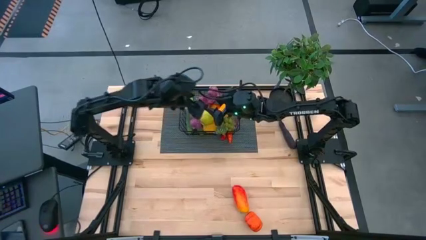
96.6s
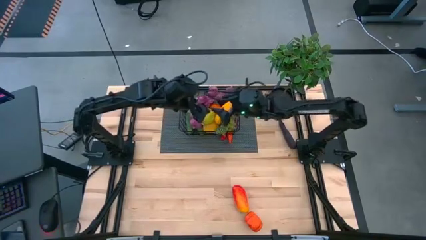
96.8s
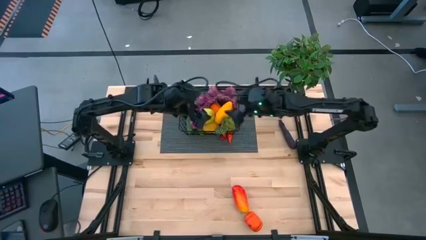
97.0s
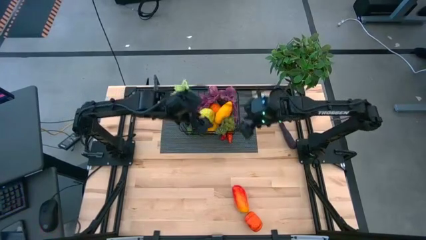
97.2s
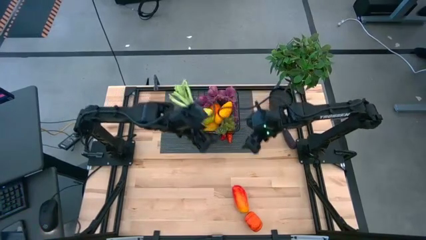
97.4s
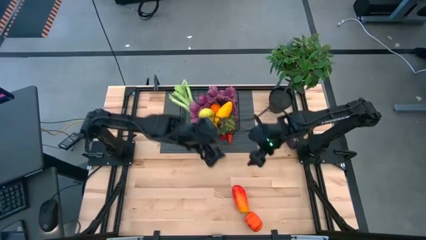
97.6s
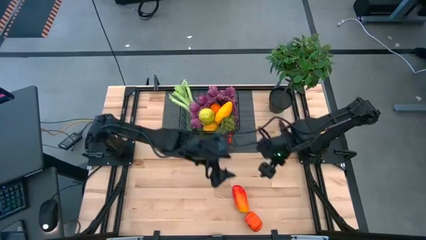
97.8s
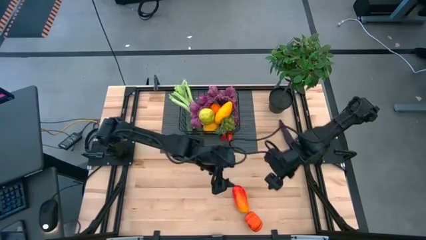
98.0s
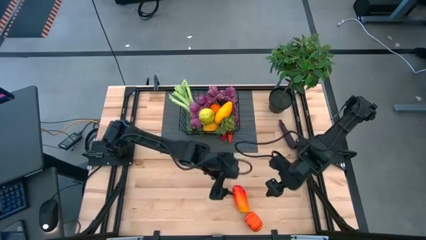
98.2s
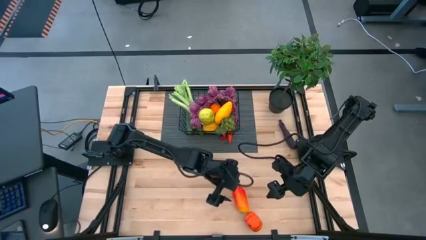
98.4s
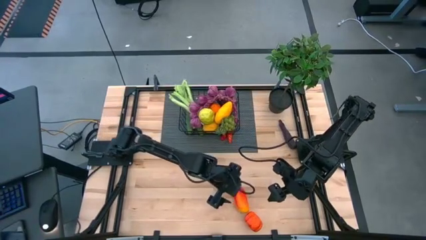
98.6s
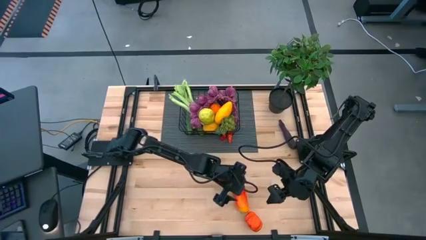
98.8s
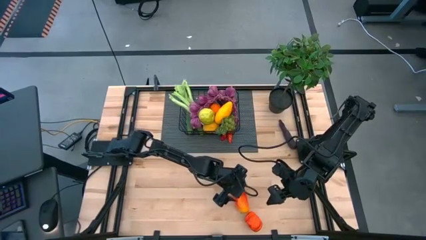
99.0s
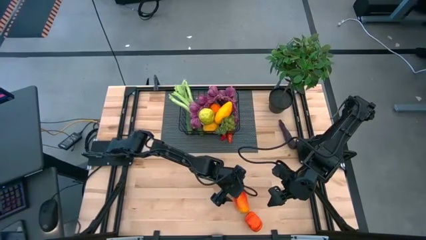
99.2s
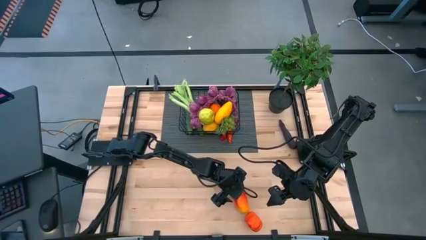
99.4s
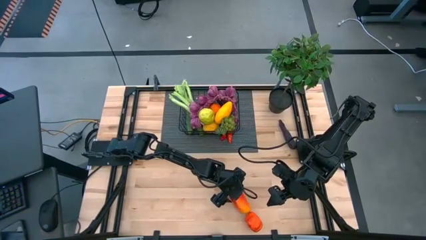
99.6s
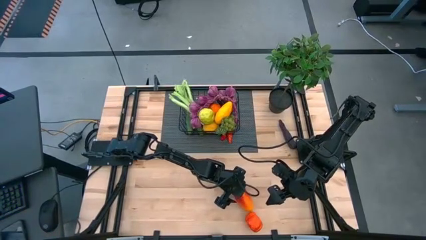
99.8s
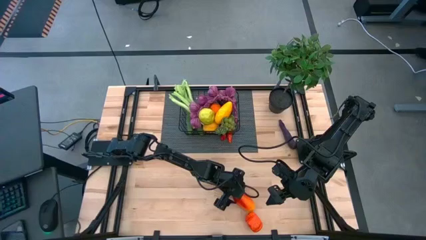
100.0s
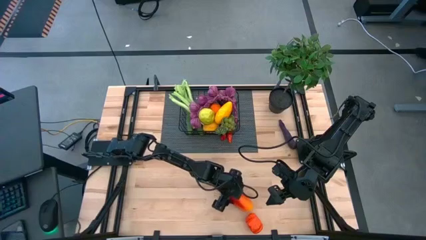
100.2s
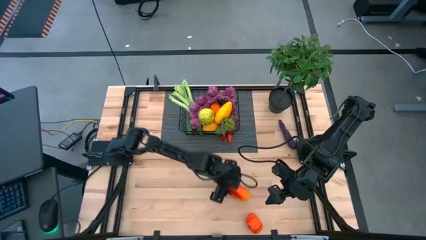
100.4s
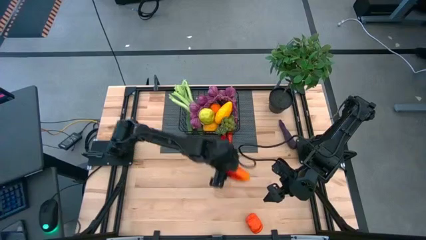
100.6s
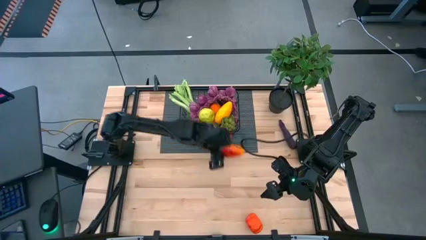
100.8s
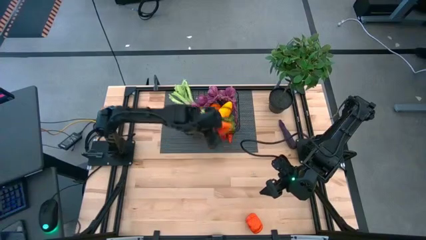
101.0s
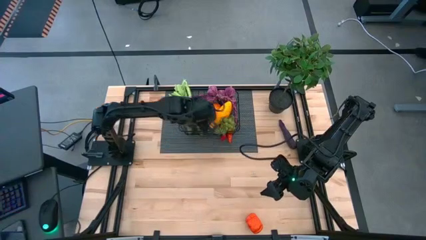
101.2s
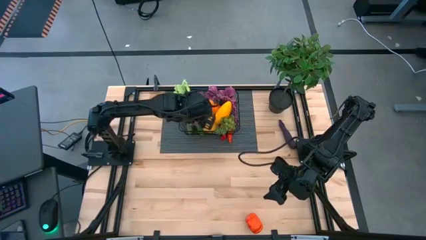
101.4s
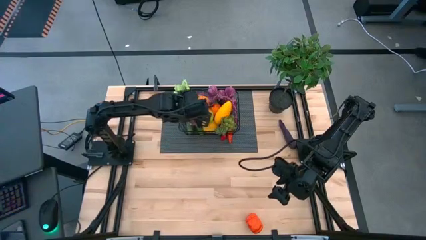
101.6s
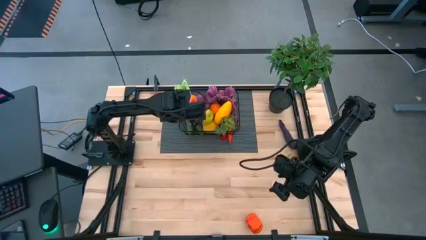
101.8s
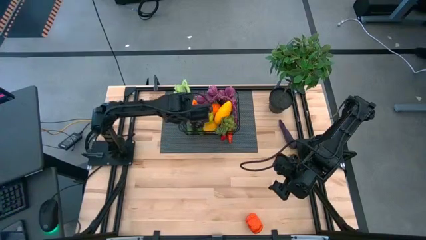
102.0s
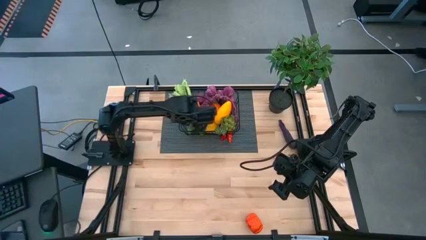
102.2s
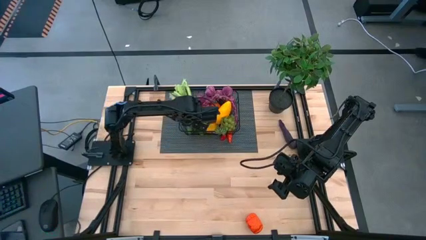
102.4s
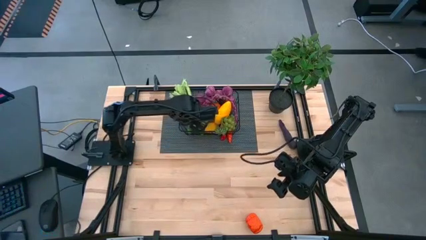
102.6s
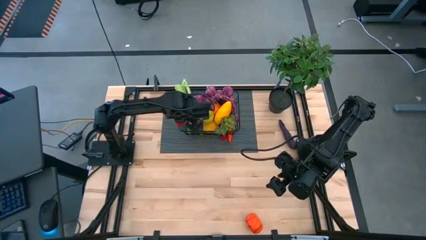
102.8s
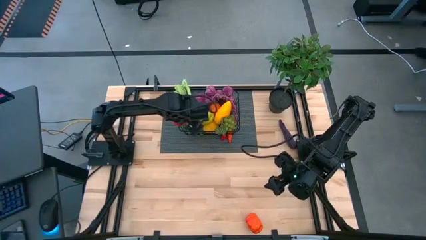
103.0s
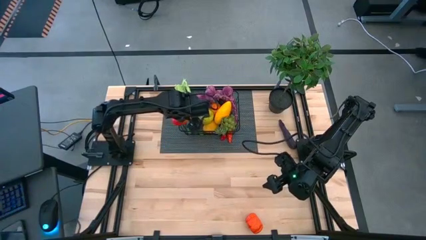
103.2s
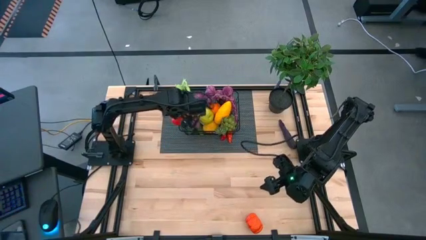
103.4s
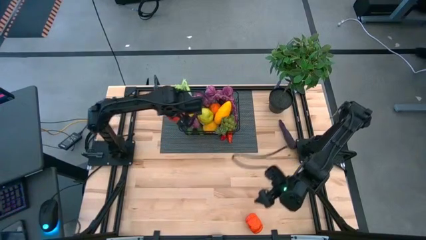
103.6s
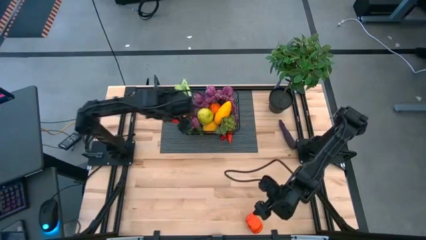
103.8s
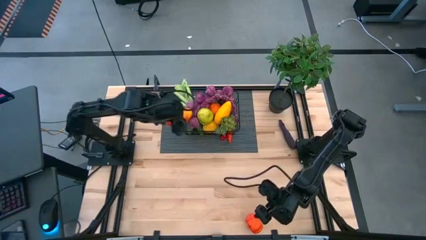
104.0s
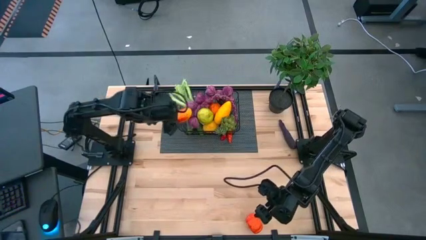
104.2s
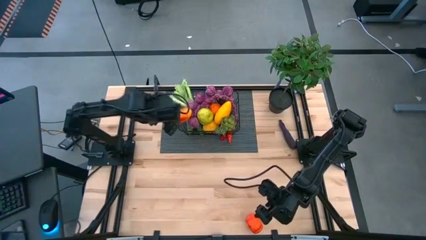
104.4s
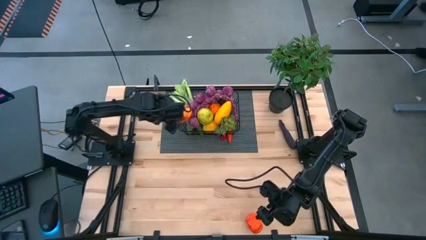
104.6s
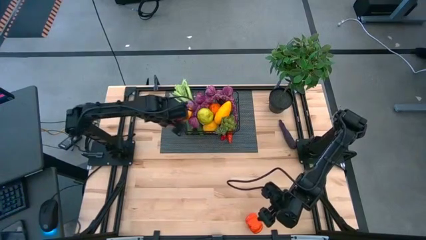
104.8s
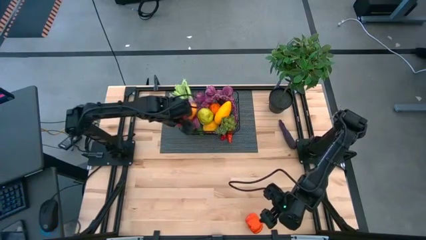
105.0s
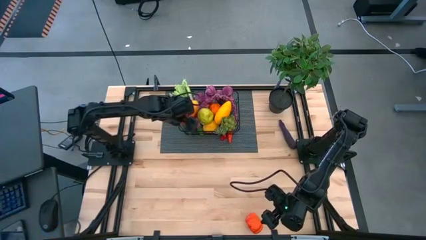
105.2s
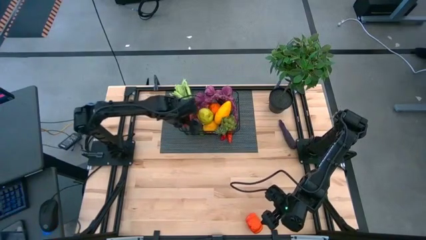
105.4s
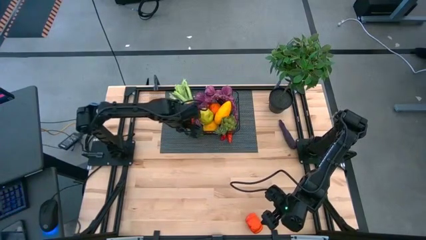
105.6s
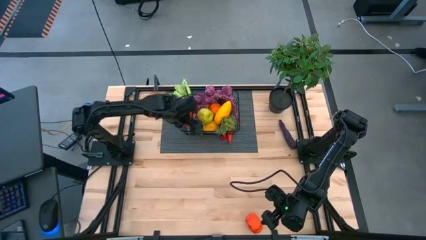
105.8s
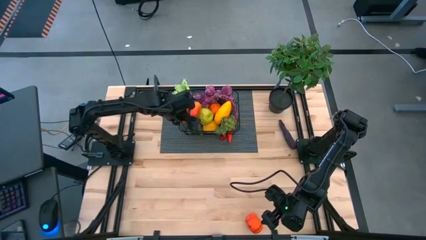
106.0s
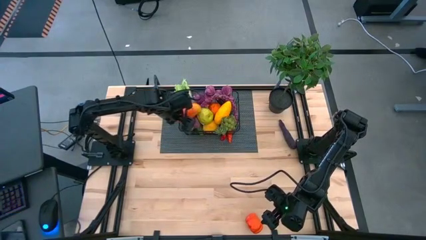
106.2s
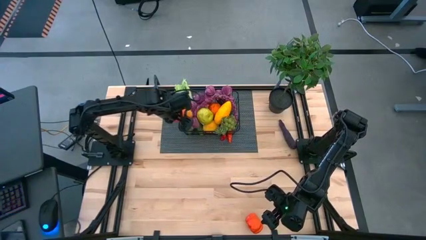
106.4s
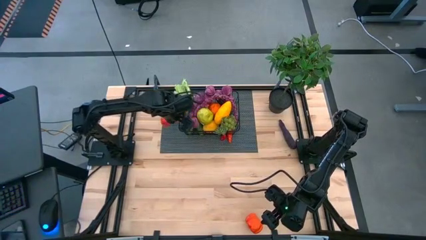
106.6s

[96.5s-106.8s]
Task: Build produce basket
Put the mango into the wire basket

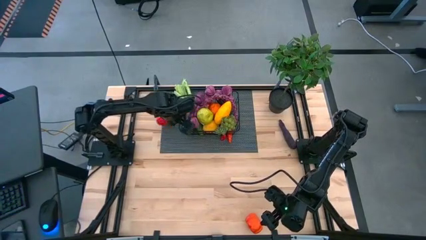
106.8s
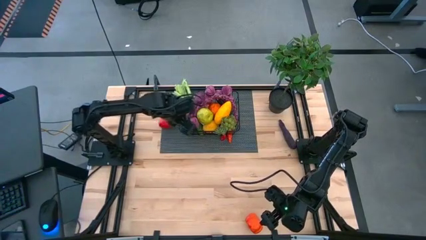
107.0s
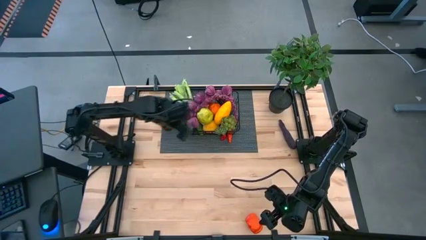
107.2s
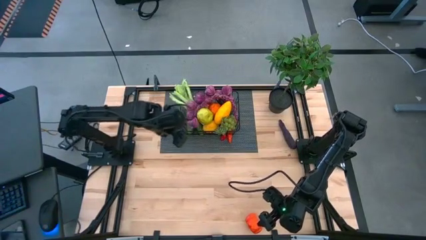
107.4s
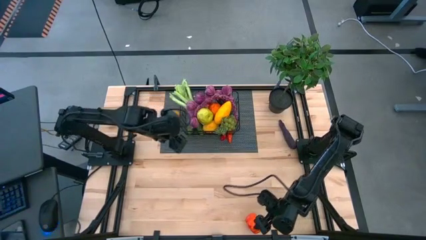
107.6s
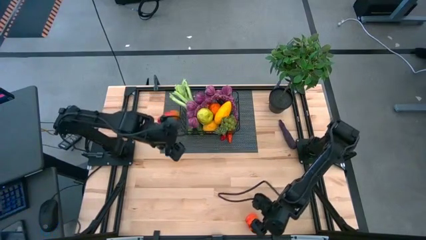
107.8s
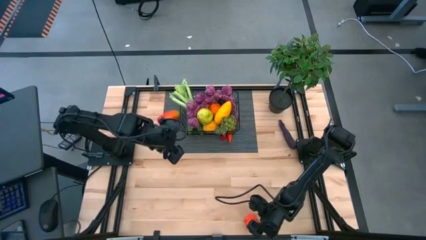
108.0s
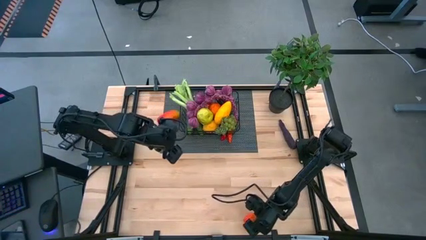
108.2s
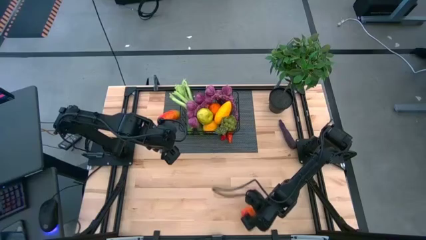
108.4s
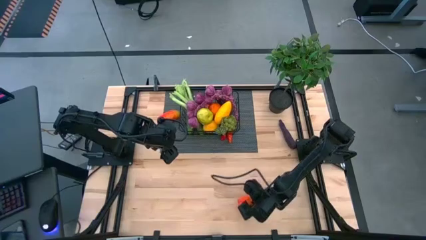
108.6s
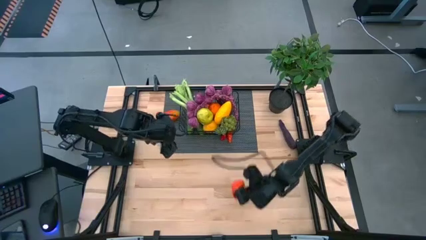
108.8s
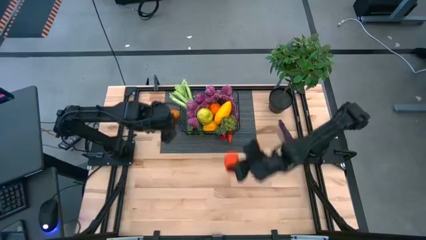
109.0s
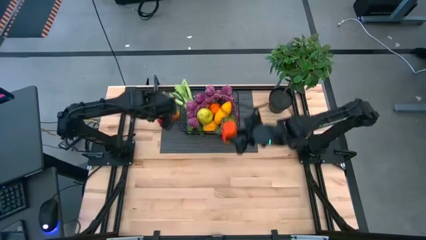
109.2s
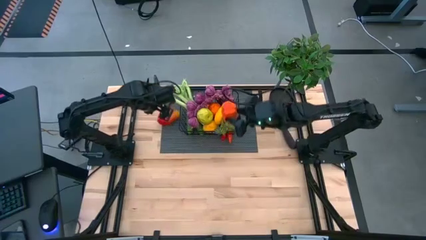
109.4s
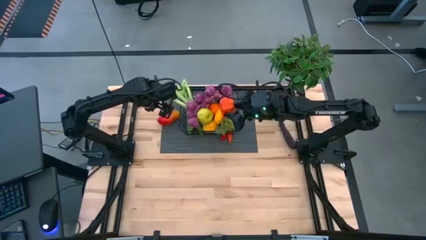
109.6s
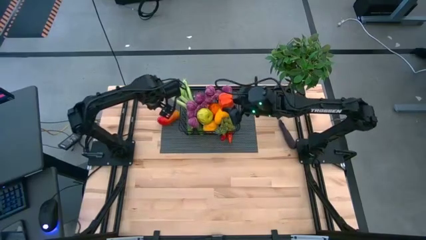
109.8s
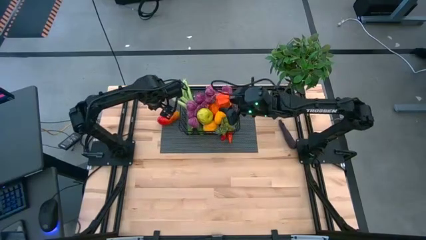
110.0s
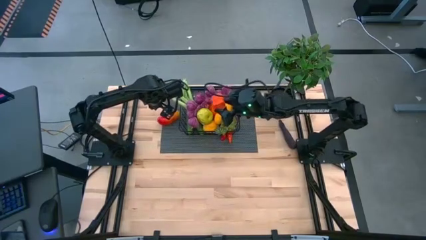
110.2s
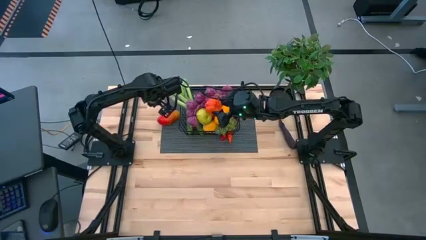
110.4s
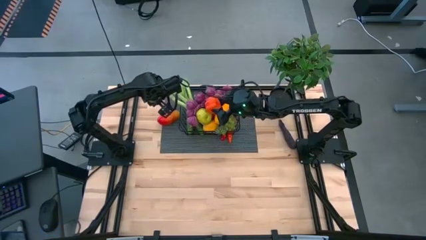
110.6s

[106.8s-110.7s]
Put the squash into the wire basket

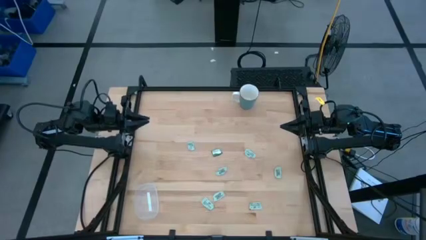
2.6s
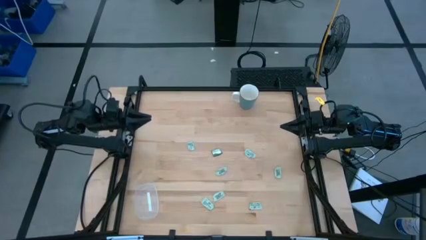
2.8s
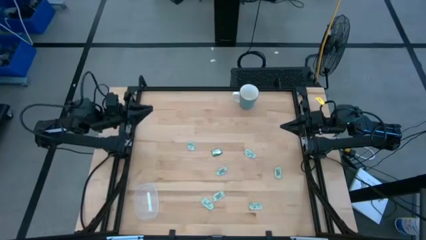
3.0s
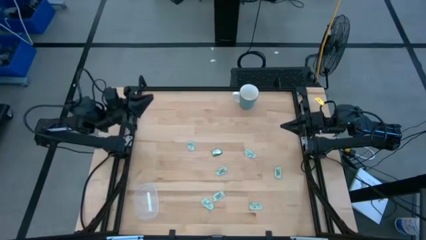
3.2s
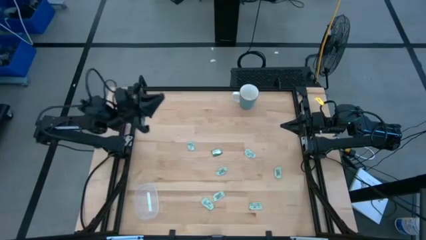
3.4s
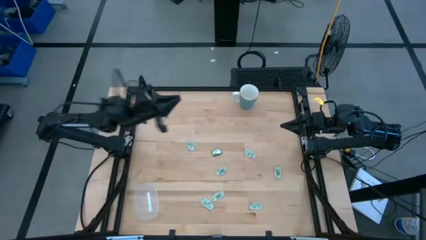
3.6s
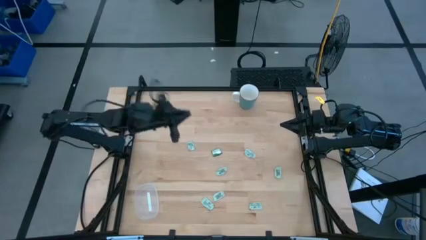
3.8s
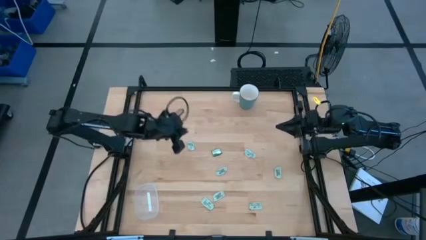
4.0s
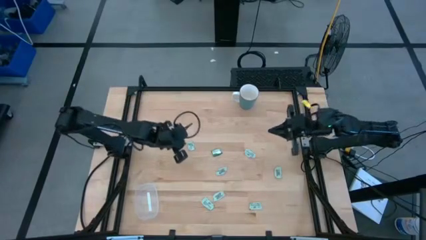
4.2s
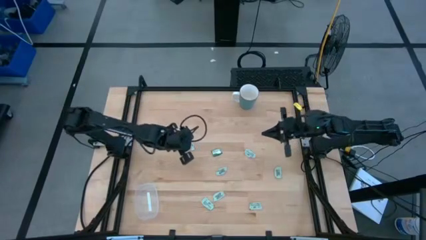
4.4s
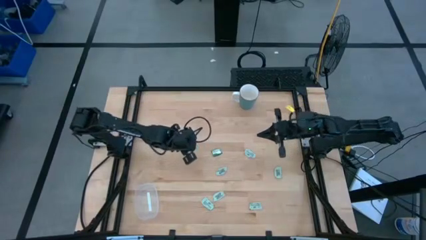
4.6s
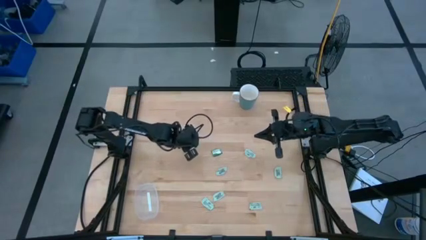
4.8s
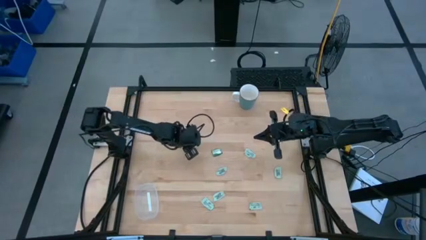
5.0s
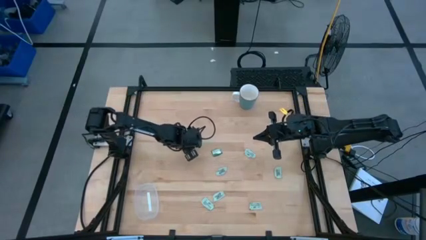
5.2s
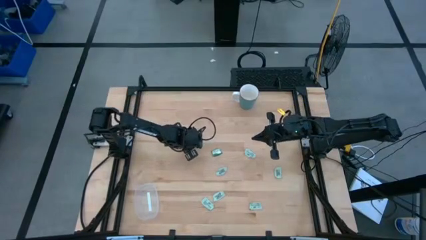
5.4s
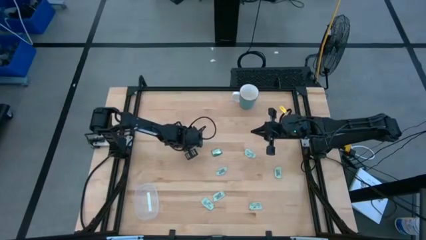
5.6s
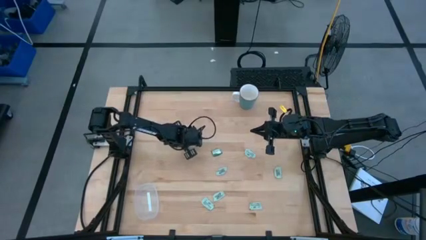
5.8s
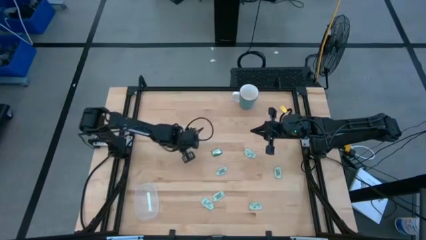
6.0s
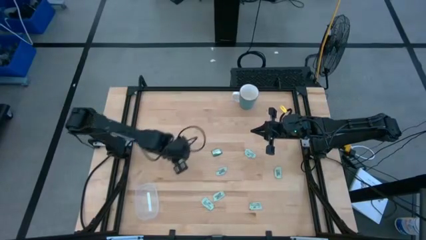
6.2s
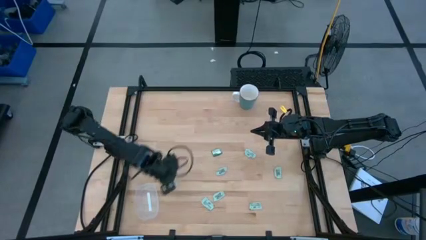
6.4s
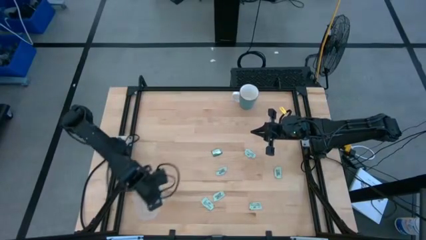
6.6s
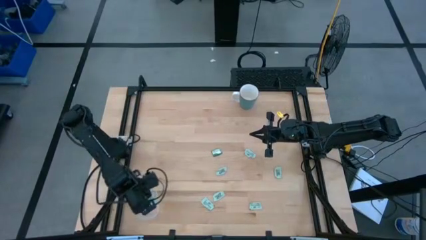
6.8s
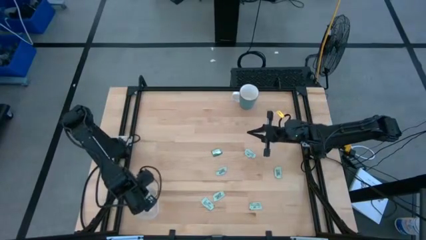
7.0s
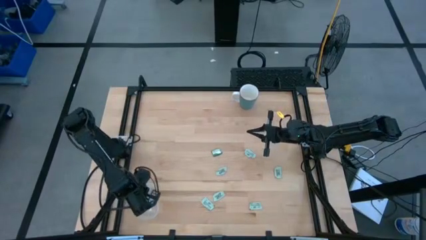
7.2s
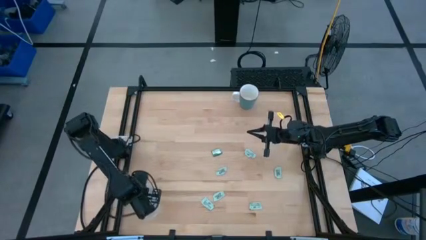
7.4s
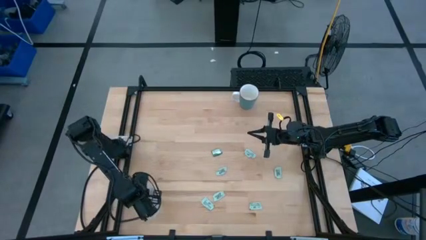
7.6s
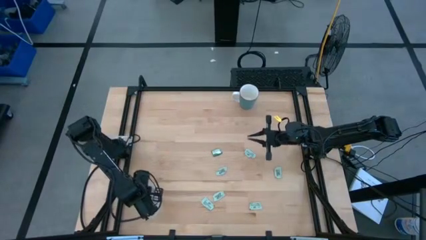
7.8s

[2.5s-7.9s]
Task: Pick and place Stevia / Truvia into bins
Put the stevia packet into the transparent container
